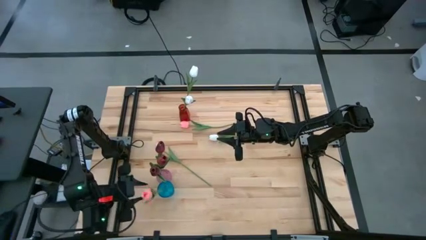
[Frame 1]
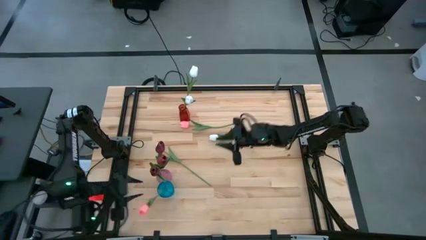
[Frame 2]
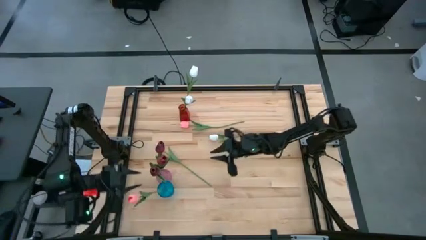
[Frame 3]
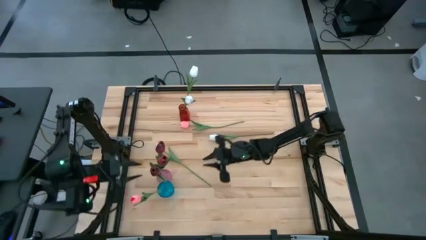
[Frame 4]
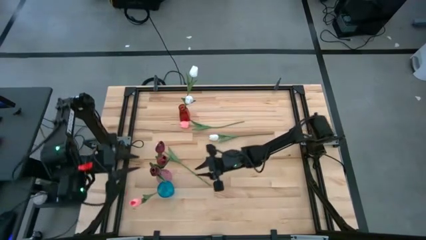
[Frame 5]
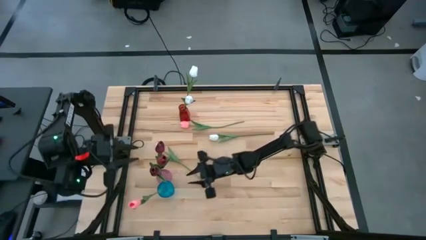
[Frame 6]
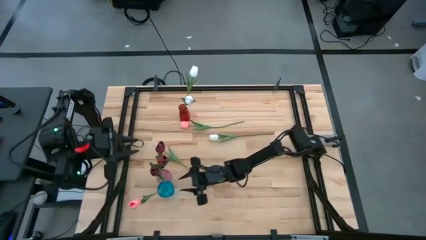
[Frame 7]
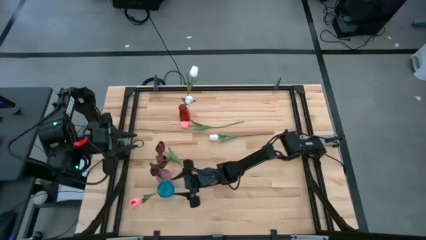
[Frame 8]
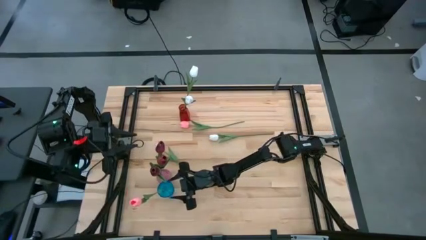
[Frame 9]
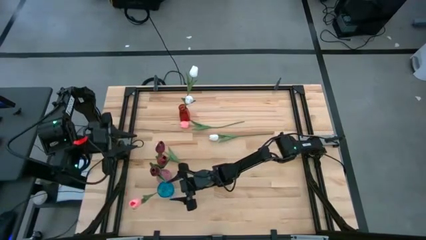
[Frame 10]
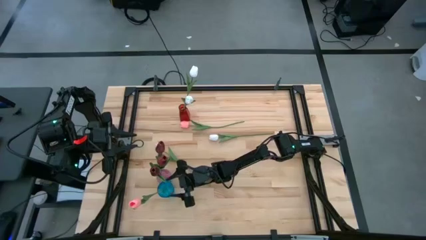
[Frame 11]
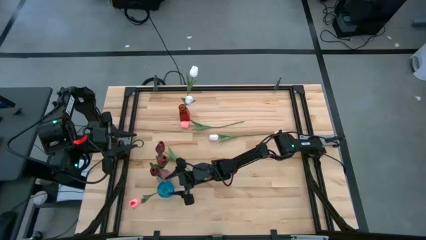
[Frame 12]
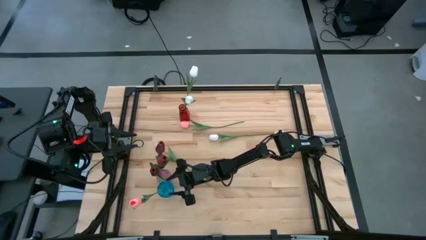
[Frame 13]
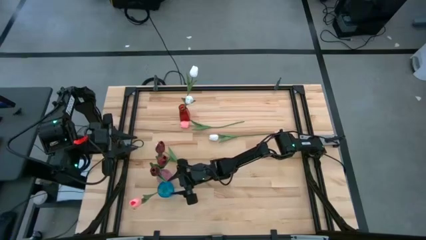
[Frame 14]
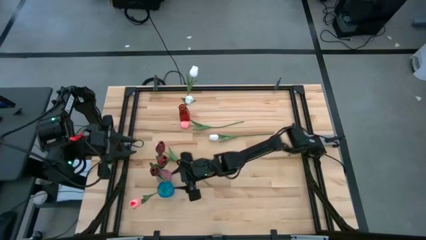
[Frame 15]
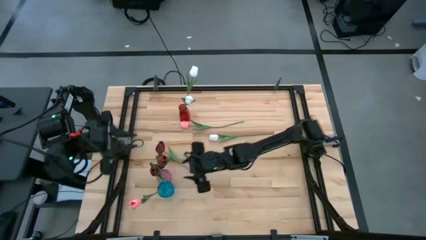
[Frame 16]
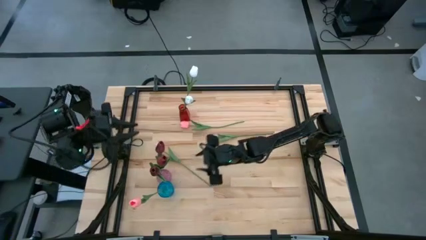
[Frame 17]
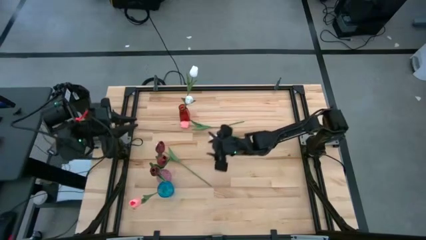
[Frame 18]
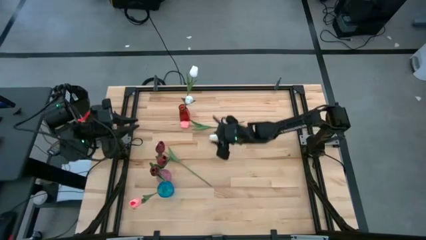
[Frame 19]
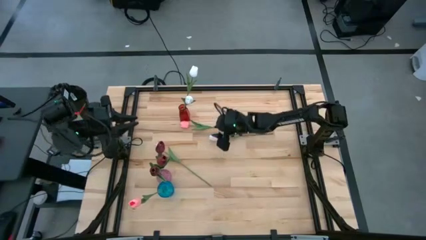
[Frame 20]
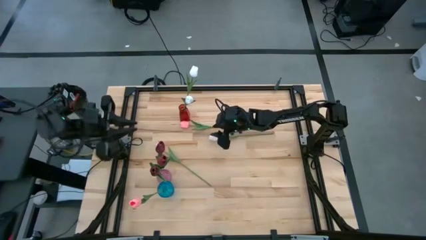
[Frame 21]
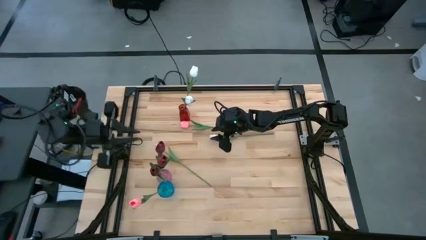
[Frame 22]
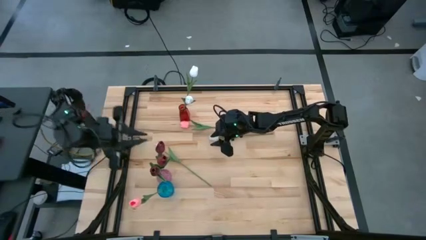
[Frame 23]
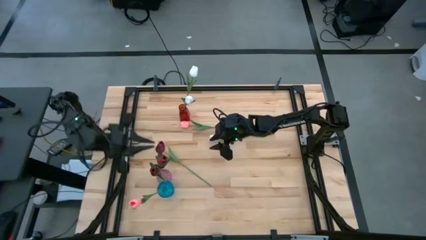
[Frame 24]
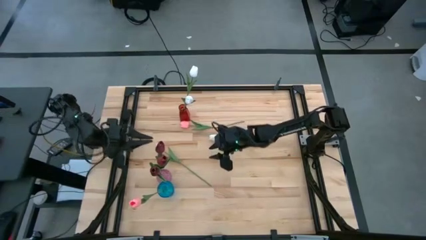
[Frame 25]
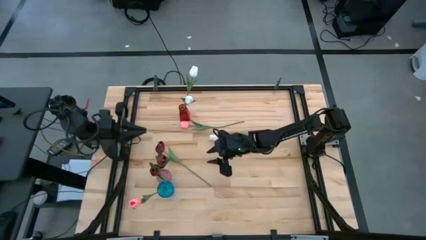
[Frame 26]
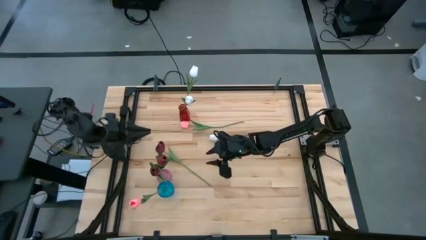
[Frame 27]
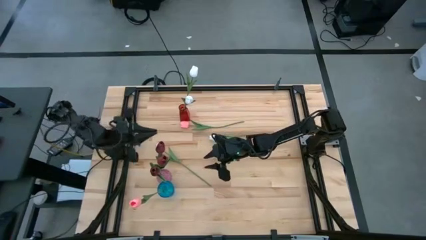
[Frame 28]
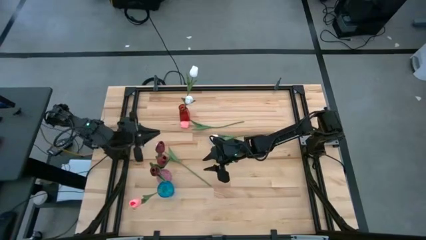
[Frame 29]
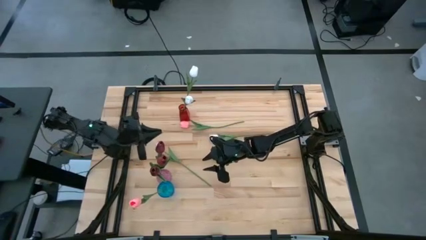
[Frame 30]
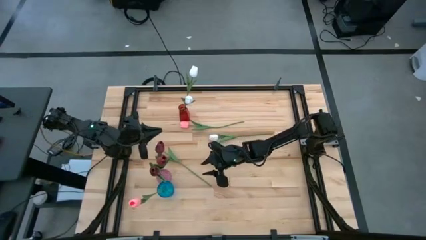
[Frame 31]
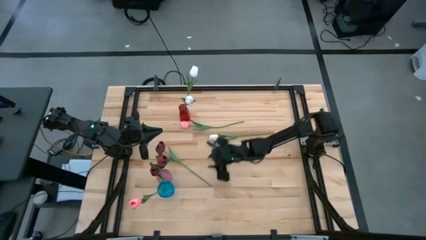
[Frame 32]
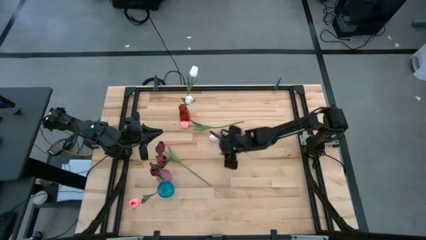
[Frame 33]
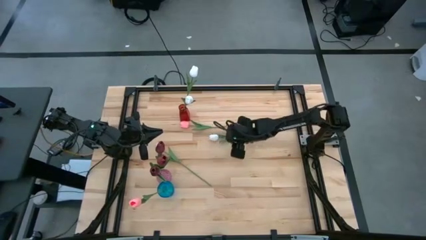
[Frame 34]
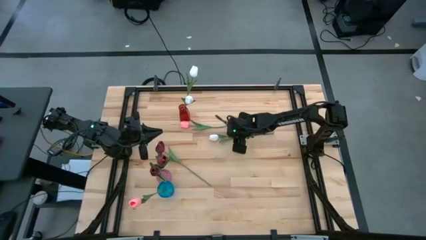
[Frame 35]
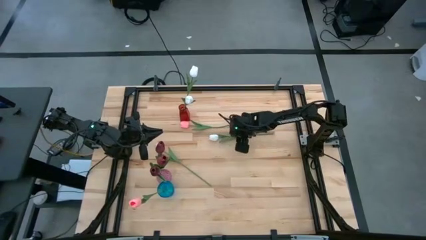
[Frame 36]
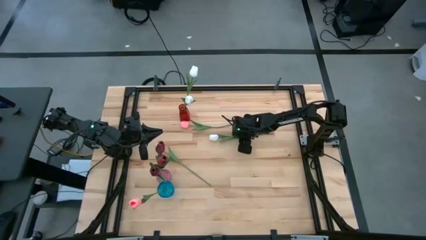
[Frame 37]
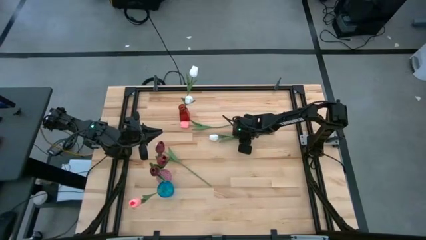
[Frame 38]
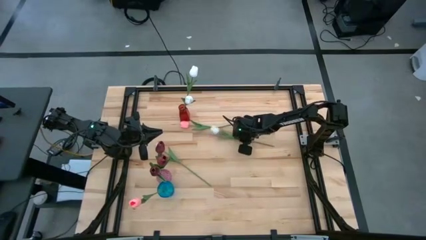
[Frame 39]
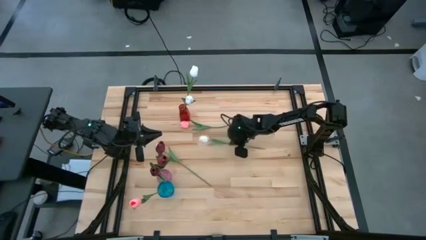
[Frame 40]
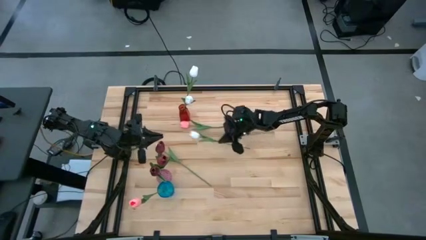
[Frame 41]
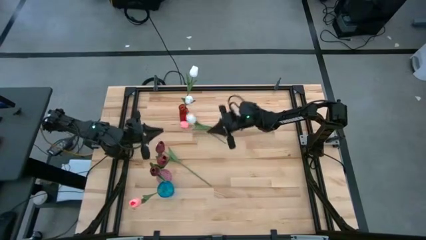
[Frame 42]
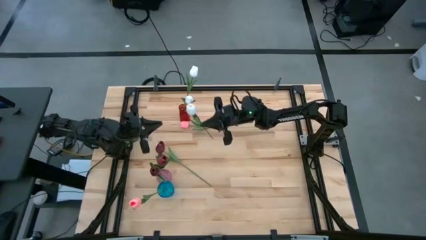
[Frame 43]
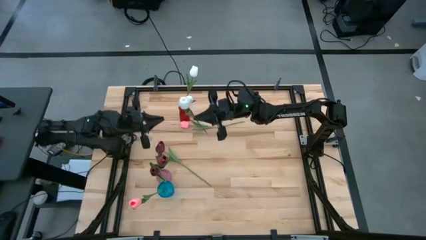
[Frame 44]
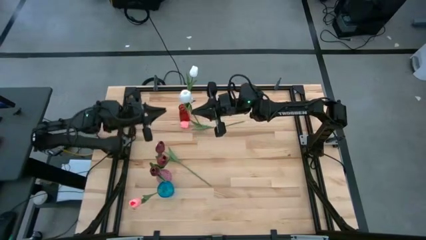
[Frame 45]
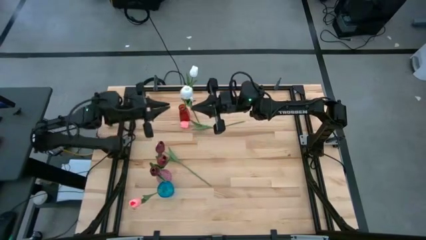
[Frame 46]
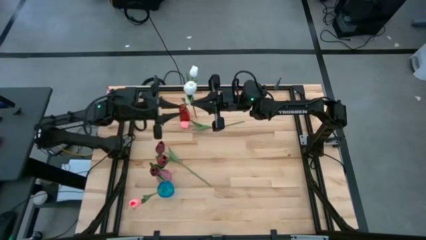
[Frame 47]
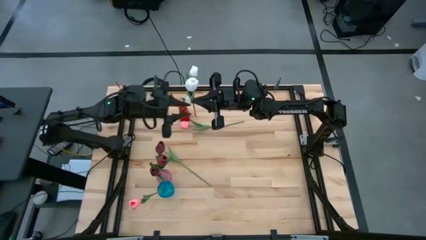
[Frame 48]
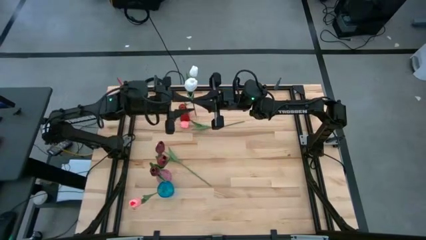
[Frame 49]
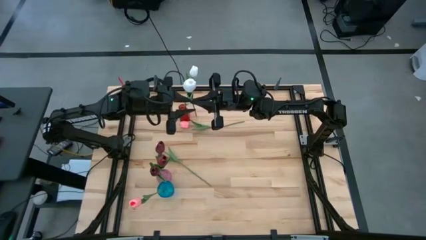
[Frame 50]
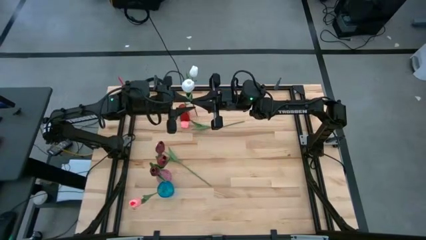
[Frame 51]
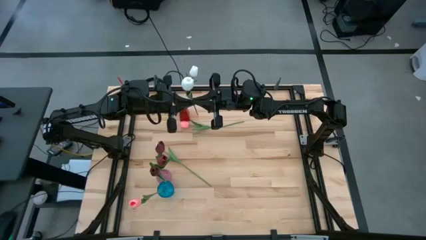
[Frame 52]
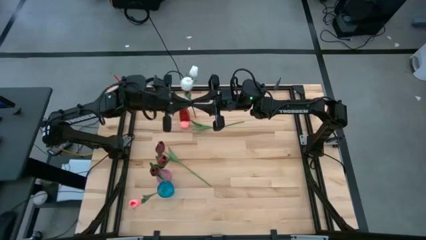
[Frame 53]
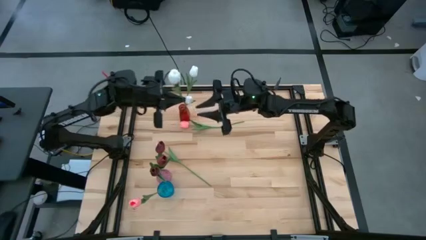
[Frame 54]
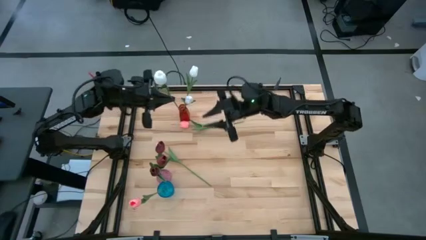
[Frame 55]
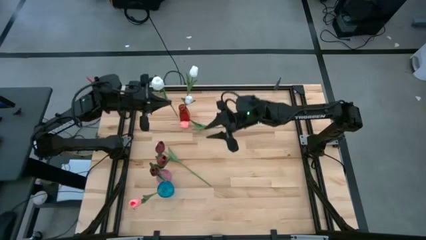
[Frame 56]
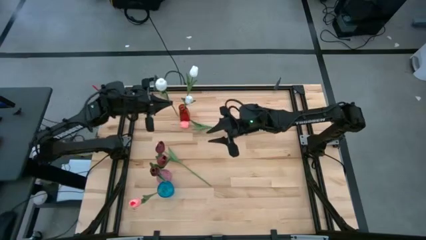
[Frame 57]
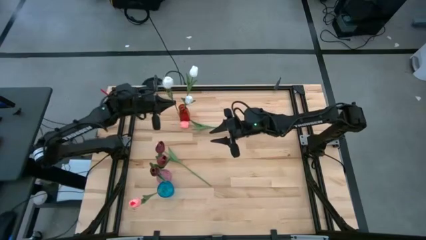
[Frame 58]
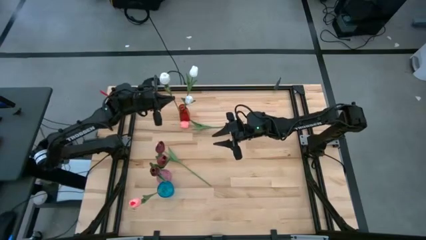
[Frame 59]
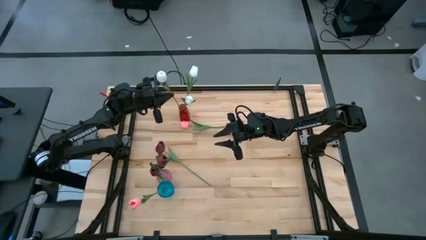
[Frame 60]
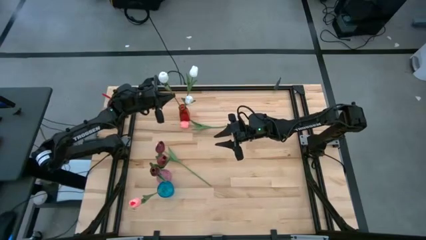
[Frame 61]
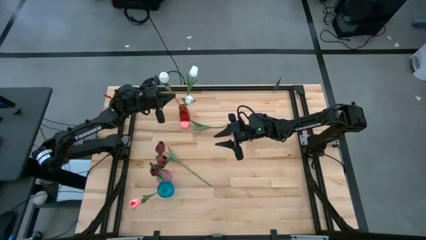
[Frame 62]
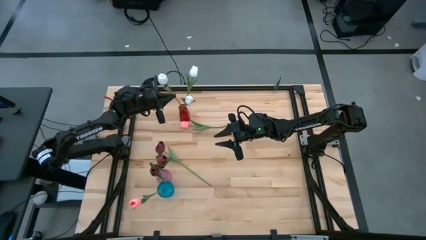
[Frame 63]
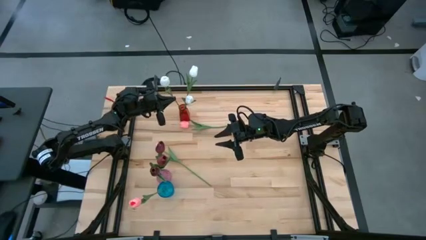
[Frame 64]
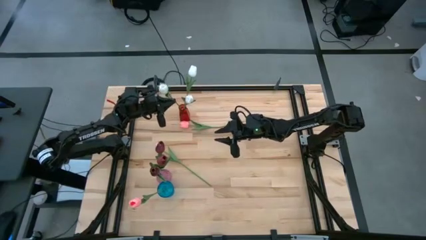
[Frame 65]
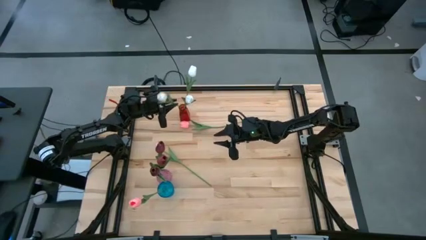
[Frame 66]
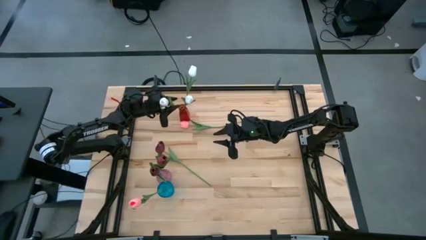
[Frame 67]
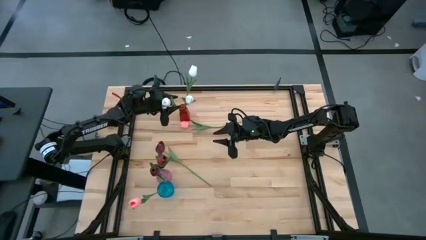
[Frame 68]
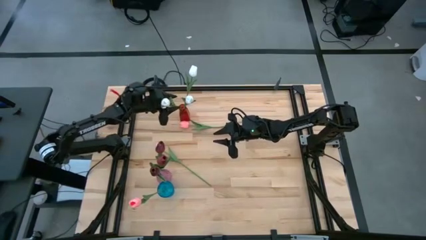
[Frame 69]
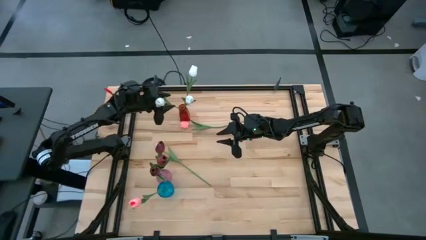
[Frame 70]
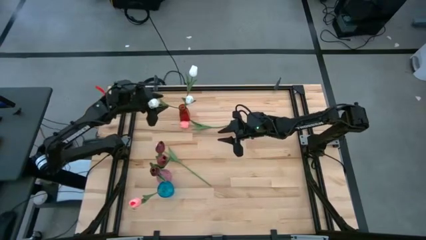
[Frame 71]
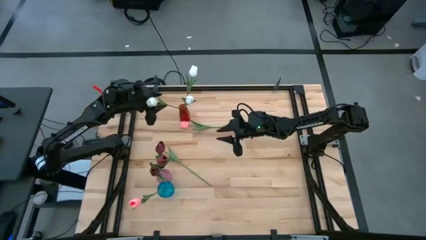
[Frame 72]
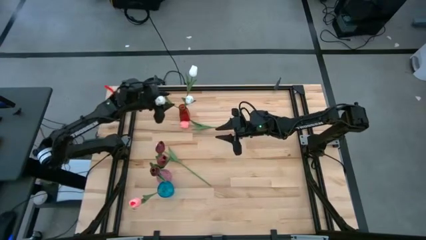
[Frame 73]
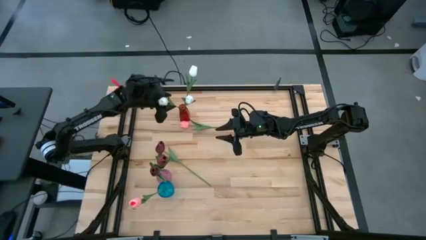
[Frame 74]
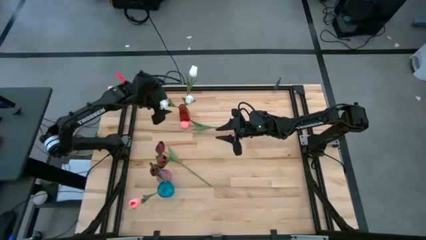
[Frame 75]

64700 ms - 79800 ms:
Task: Sort flowers into vase by color
Put the white tulip into the red vase
